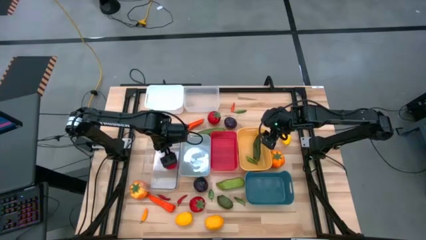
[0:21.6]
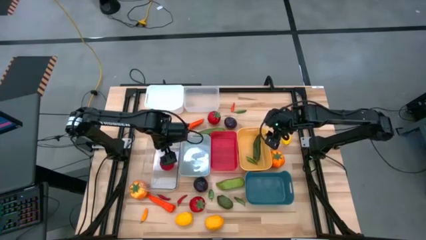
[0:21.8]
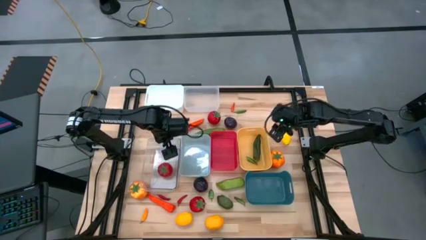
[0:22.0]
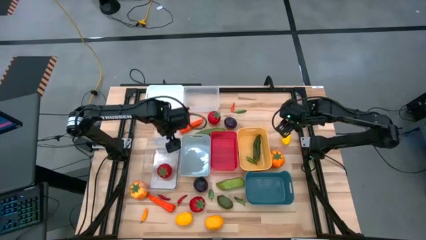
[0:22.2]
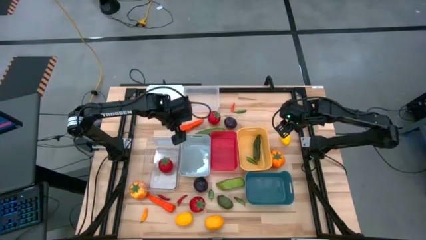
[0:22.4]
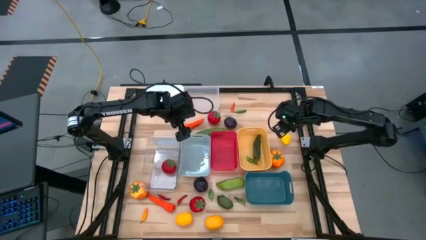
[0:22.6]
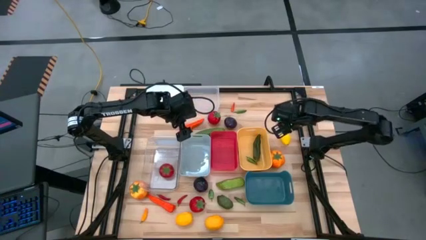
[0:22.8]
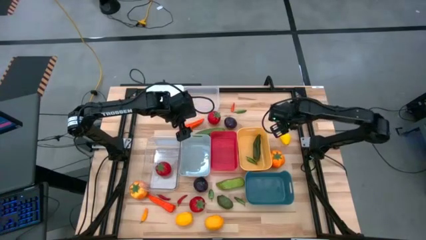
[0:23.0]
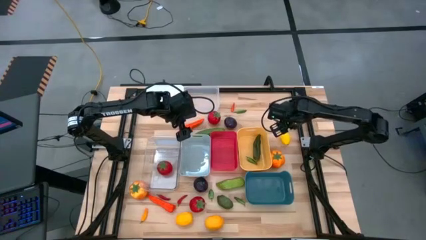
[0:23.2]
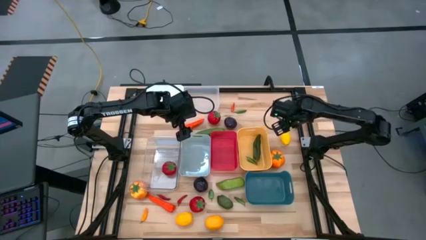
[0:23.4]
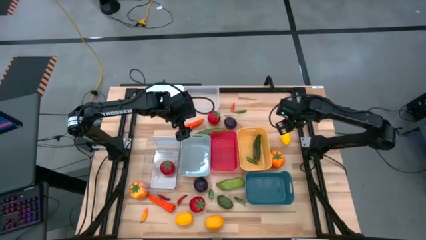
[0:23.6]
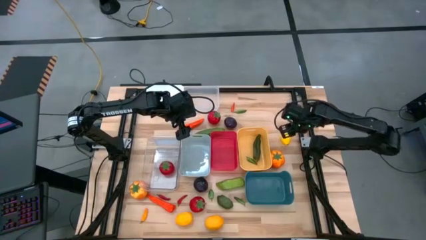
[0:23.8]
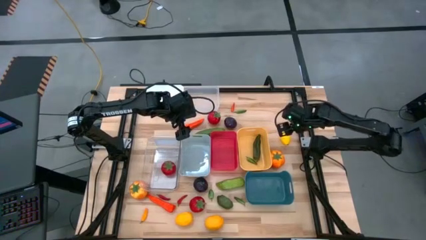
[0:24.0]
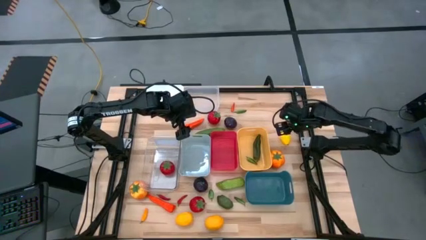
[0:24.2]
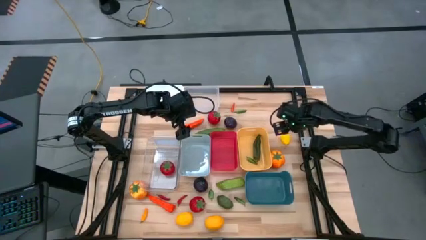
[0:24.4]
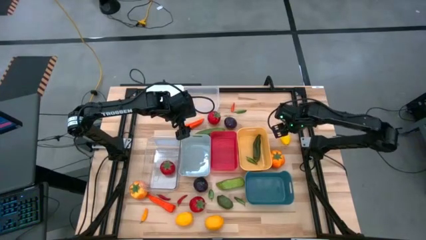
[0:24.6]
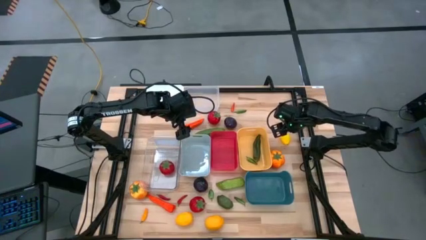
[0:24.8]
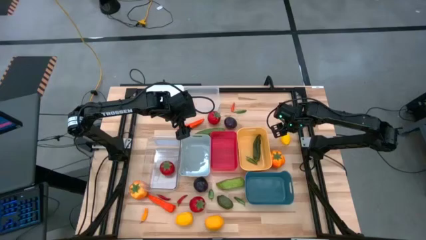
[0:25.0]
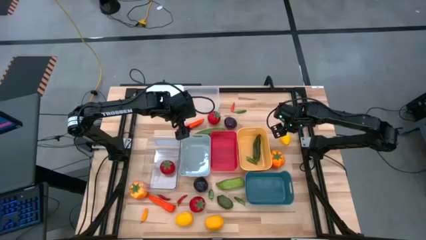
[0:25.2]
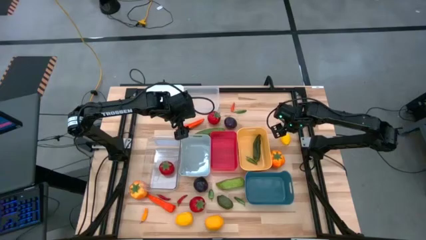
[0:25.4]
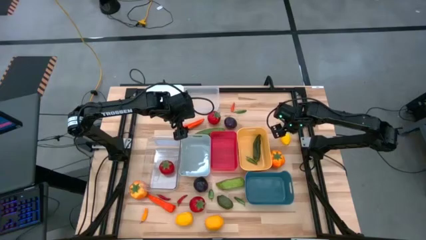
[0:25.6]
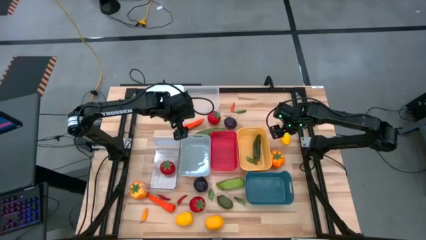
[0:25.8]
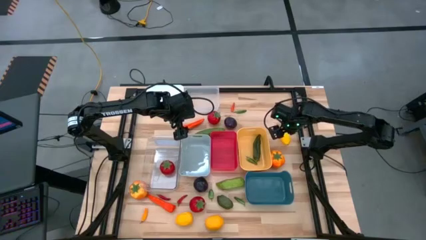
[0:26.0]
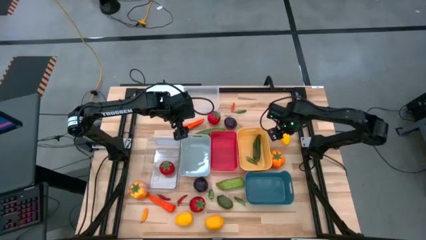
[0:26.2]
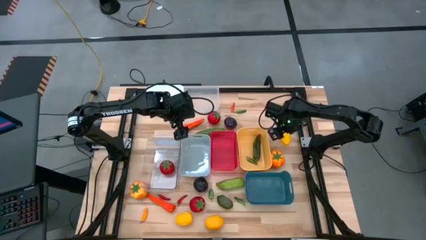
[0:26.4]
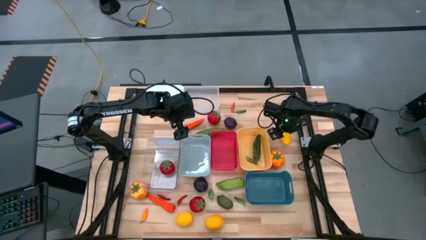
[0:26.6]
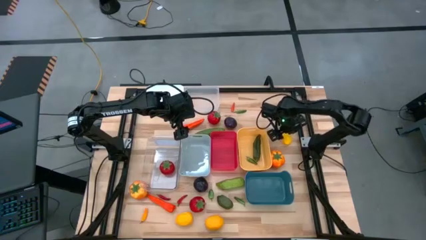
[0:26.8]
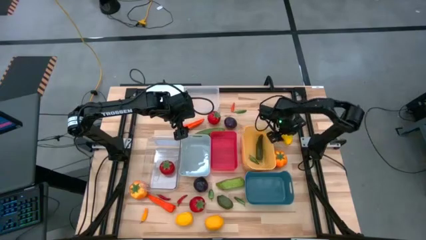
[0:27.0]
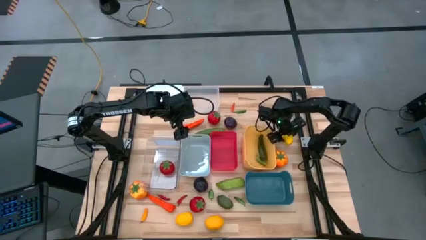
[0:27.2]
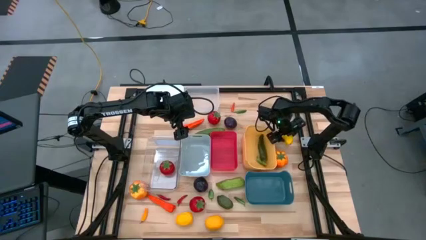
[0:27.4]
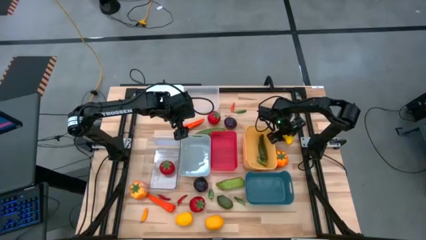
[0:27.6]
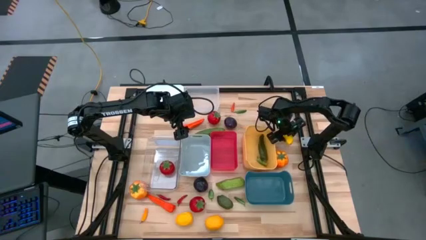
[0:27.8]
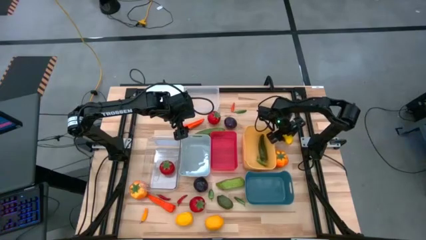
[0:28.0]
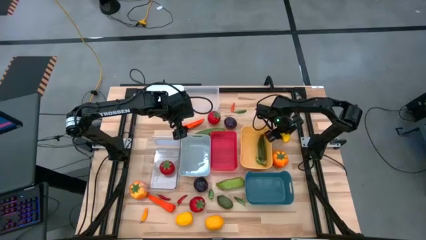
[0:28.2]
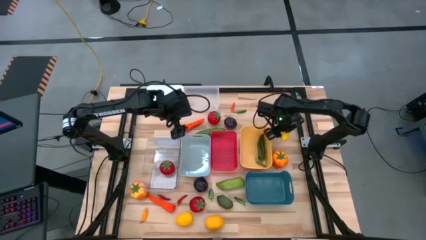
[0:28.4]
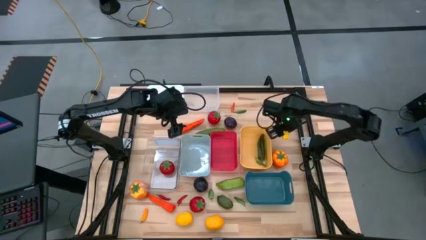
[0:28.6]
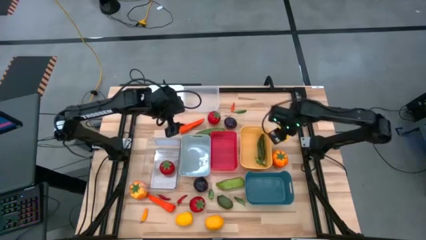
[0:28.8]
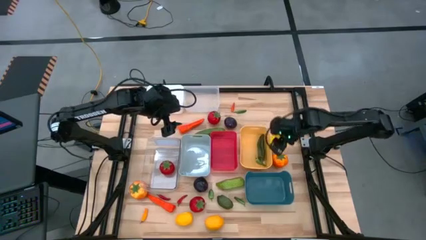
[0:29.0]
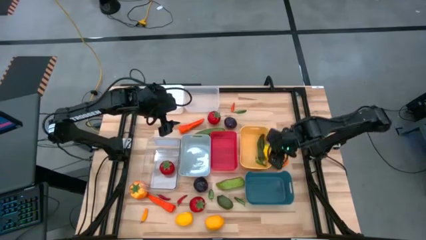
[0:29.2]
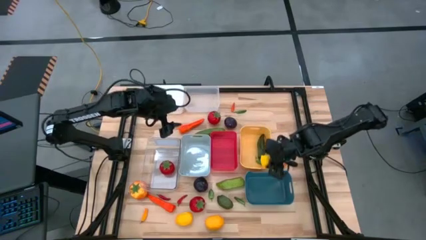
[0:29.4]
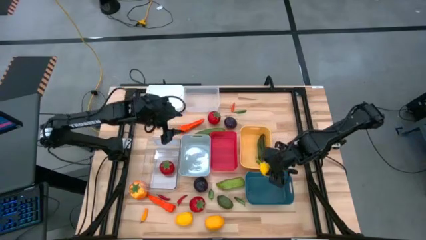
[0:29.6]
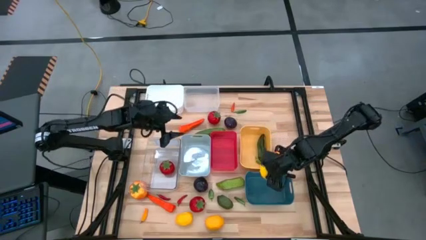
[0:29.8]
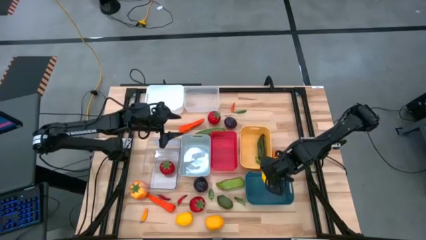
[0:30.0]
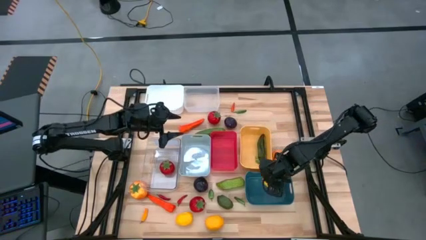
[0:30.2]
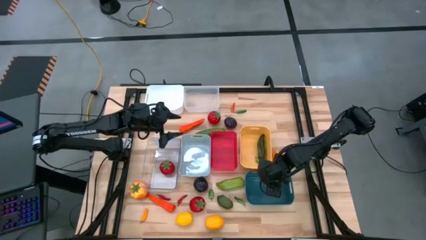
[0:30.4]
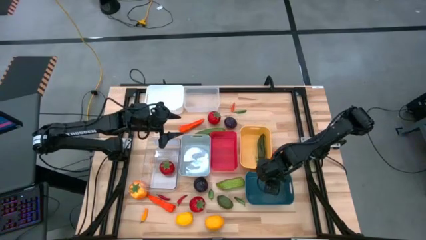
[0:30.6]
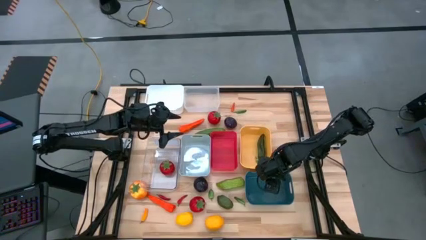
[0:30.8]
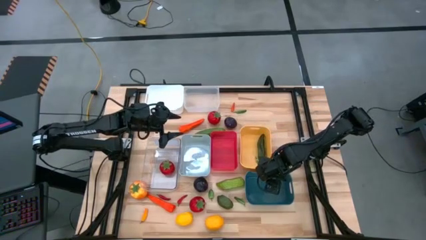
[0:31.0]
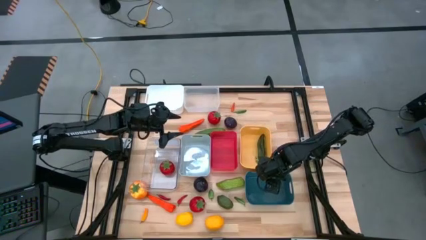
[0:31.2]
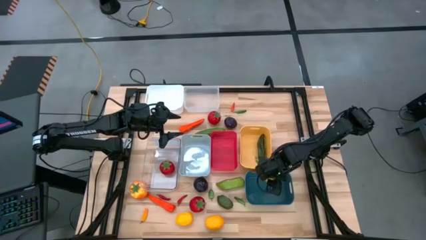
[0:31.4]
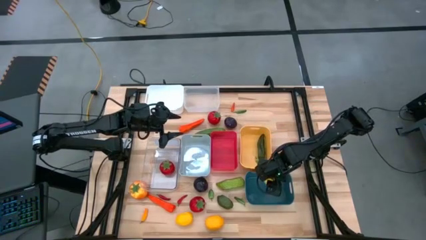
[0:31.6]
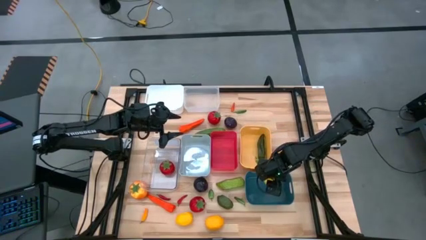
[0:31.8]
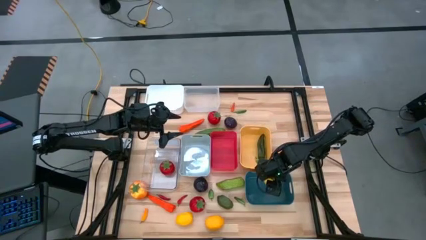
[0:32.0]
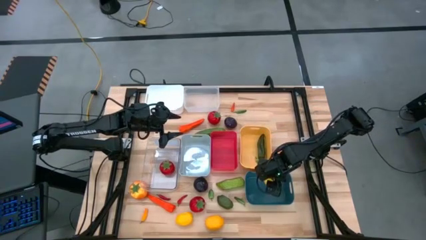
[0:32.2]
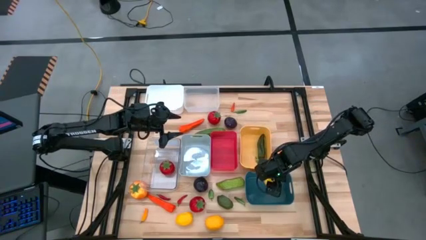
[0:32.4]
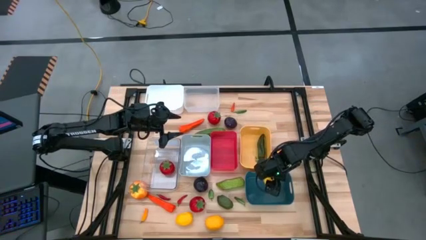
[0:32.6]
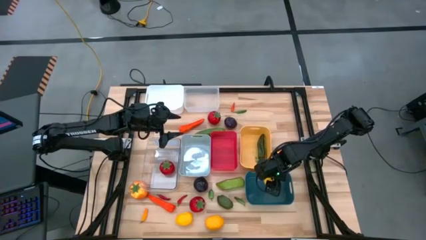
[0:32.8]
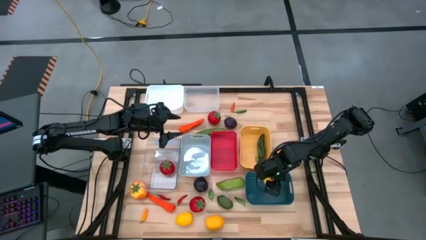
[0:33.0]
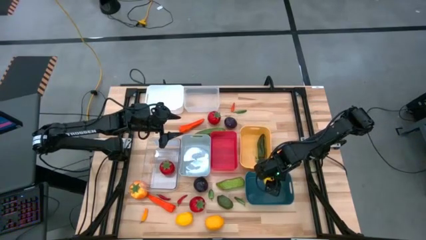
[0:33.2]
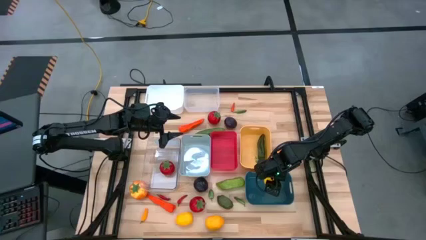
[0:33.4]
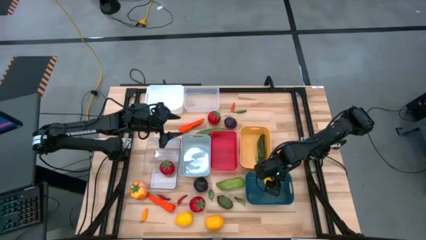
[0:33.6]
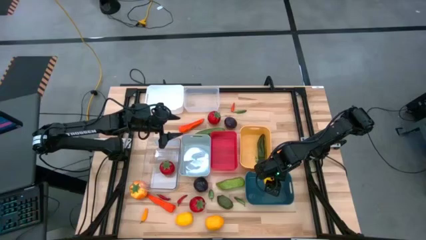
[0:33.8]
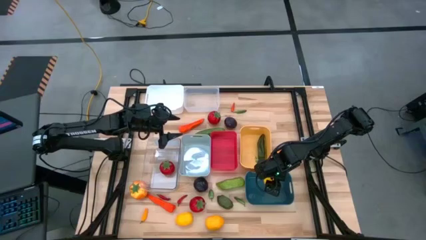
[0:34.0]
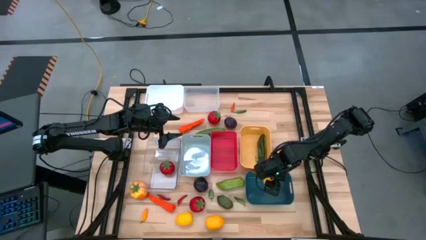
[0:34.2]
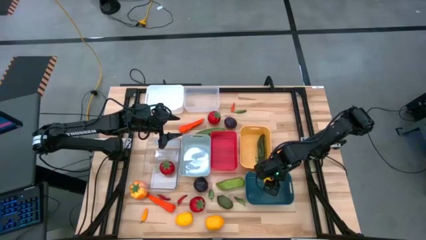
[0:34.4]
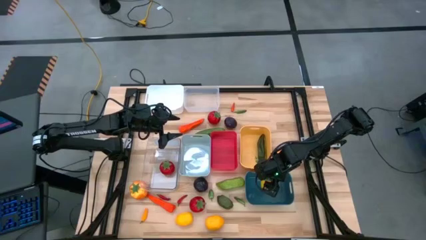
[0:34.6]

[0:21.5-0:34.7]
Task: Sort produce into baskets
Put the lemon into the blue bin
